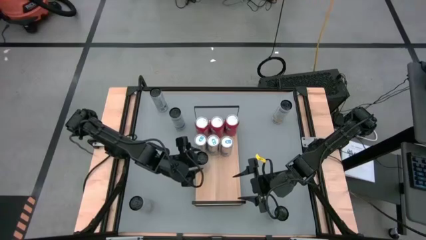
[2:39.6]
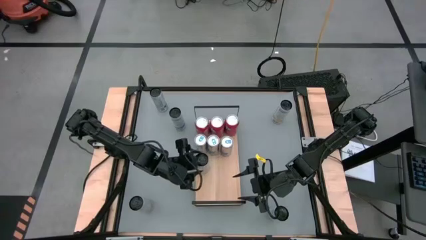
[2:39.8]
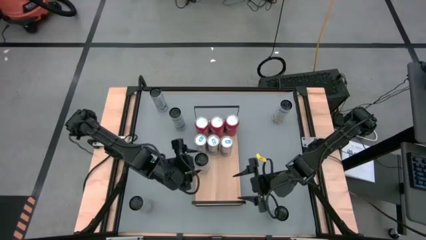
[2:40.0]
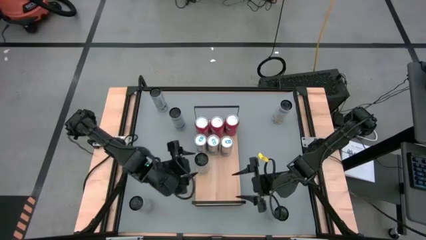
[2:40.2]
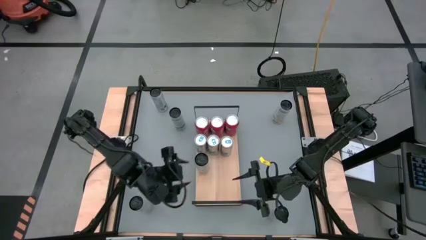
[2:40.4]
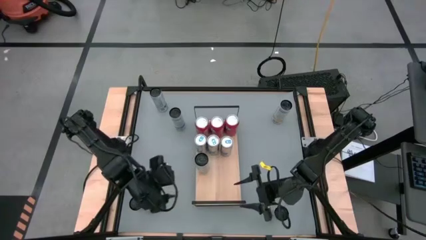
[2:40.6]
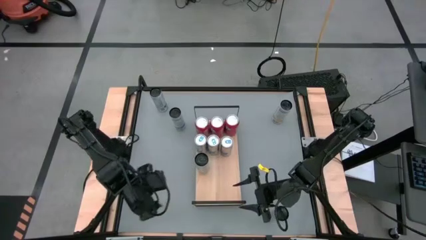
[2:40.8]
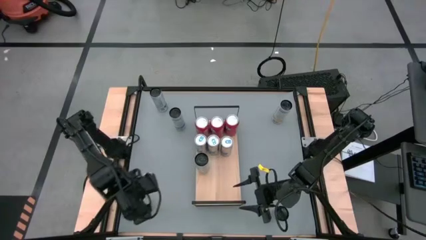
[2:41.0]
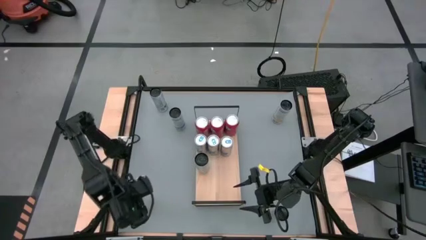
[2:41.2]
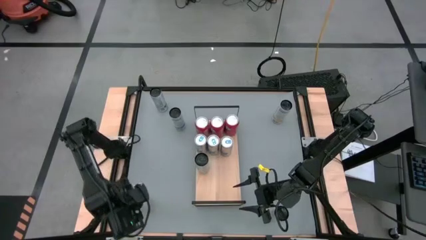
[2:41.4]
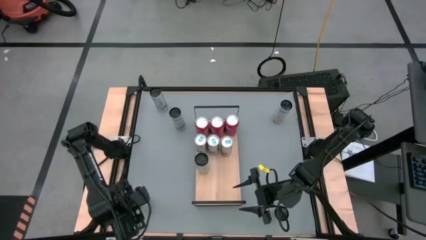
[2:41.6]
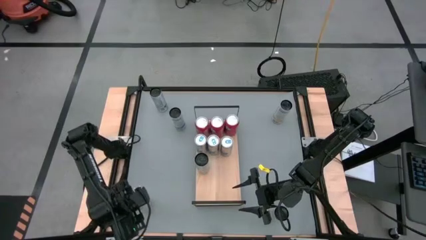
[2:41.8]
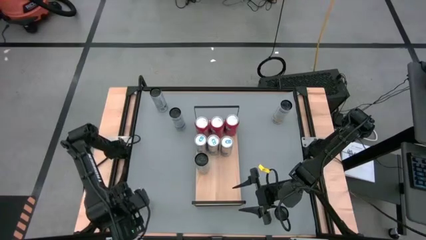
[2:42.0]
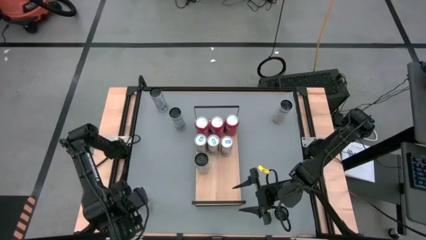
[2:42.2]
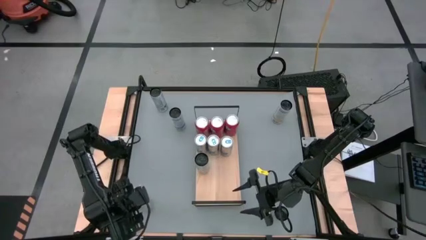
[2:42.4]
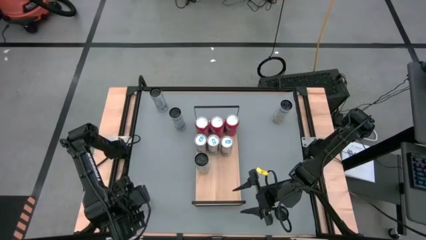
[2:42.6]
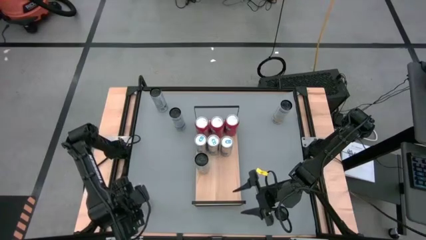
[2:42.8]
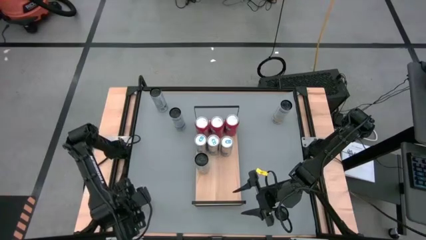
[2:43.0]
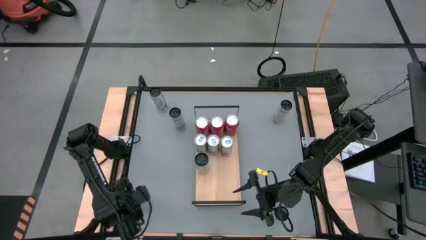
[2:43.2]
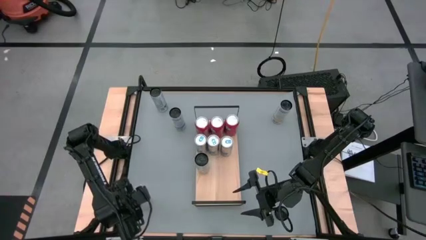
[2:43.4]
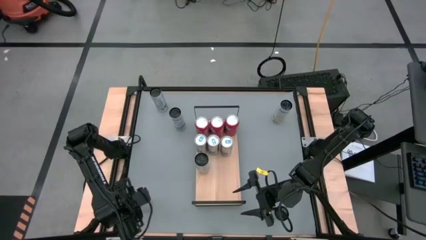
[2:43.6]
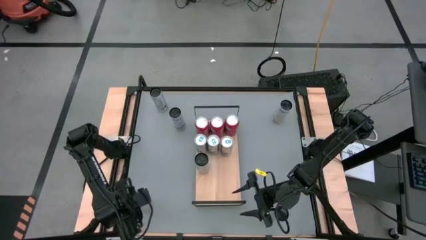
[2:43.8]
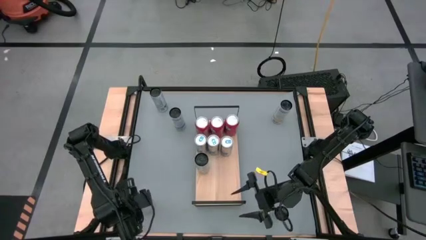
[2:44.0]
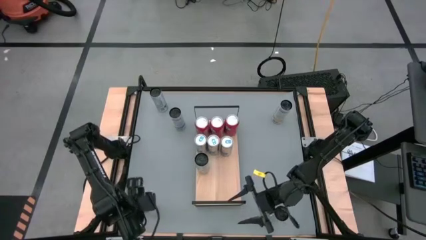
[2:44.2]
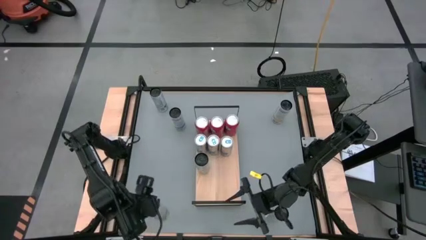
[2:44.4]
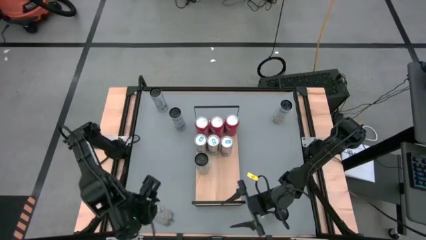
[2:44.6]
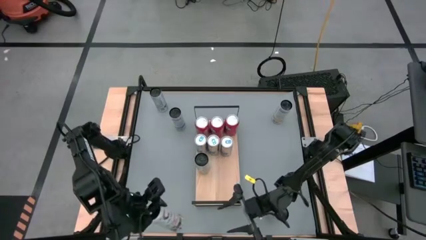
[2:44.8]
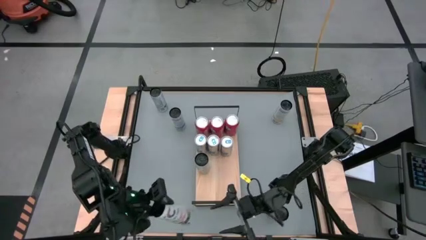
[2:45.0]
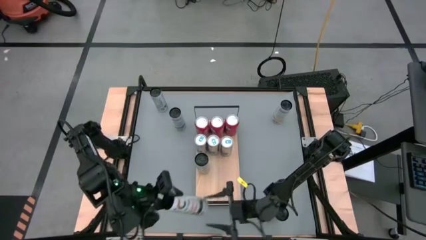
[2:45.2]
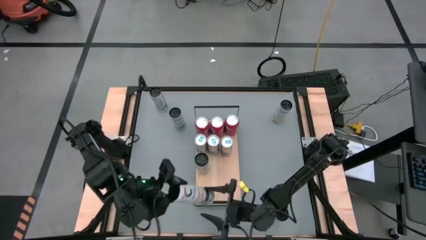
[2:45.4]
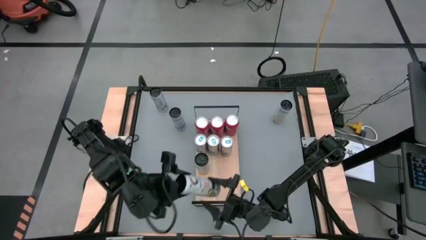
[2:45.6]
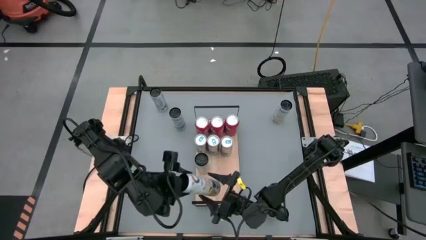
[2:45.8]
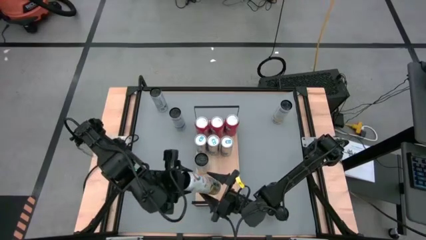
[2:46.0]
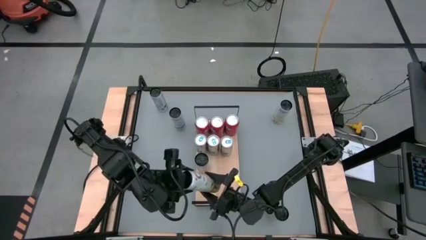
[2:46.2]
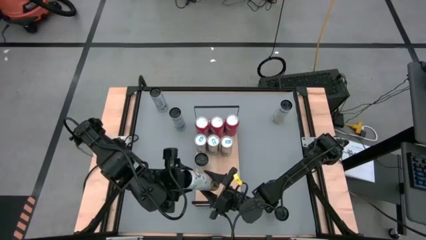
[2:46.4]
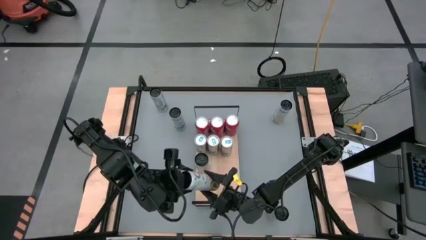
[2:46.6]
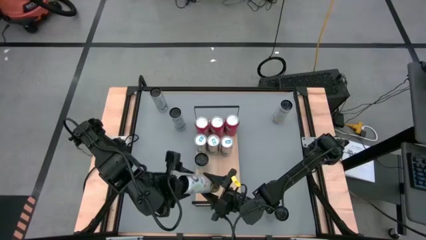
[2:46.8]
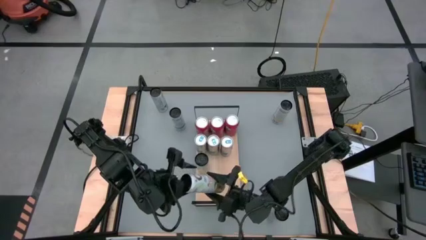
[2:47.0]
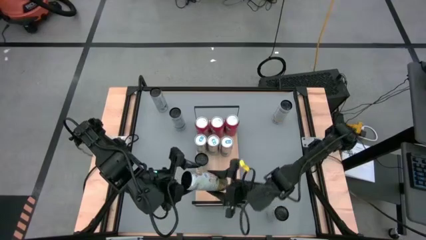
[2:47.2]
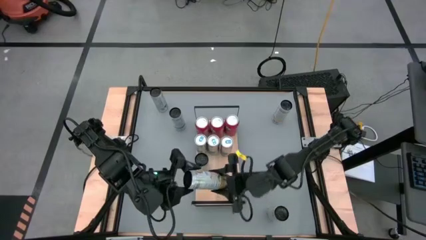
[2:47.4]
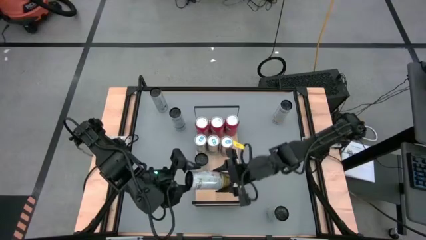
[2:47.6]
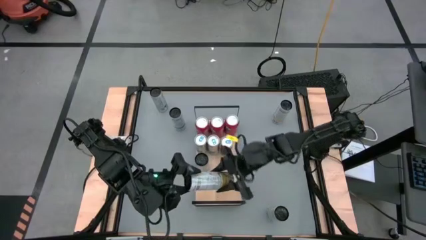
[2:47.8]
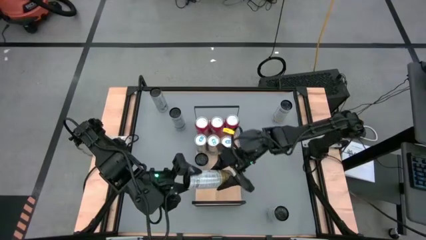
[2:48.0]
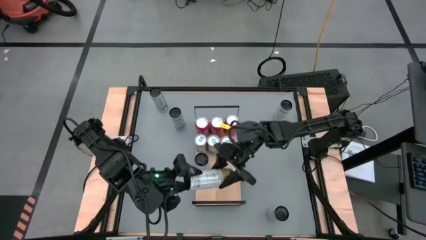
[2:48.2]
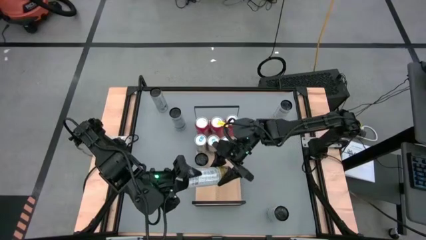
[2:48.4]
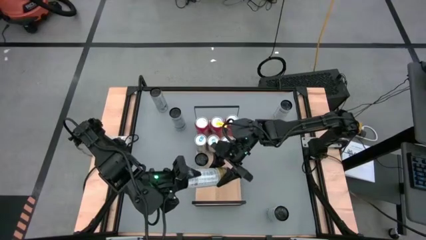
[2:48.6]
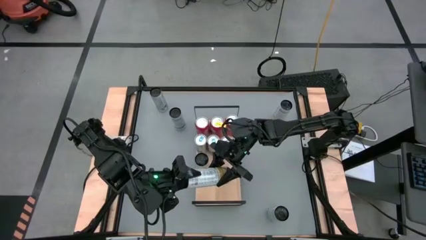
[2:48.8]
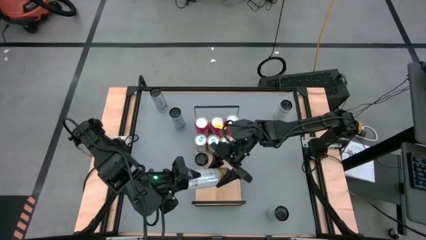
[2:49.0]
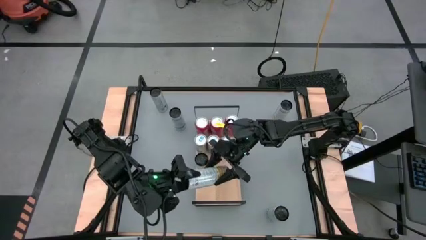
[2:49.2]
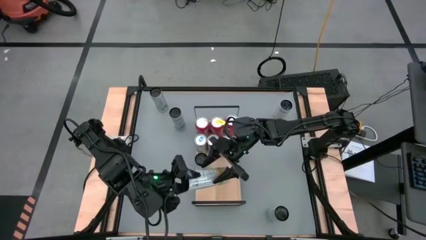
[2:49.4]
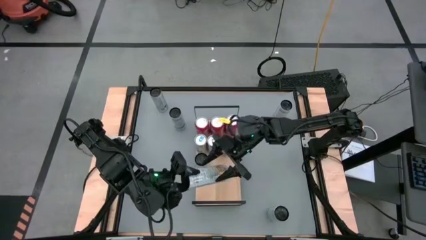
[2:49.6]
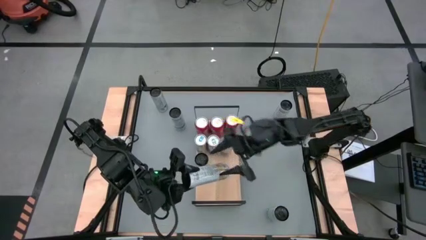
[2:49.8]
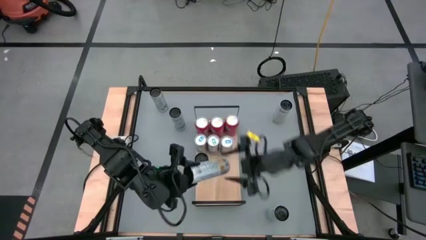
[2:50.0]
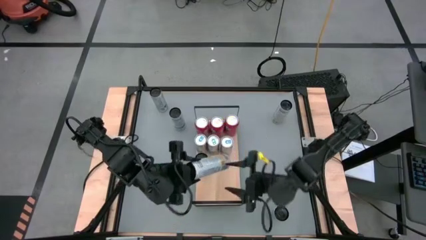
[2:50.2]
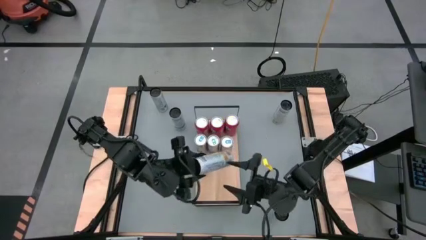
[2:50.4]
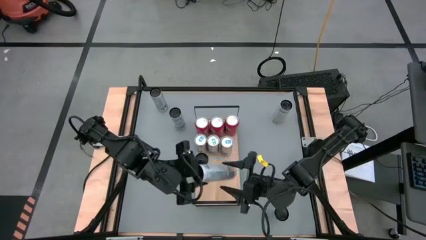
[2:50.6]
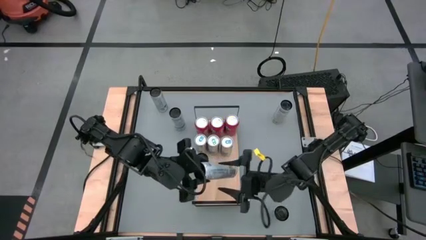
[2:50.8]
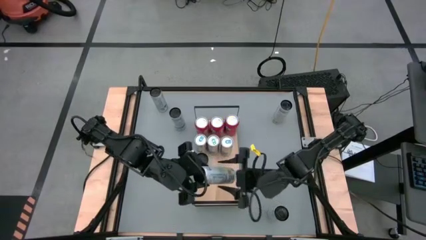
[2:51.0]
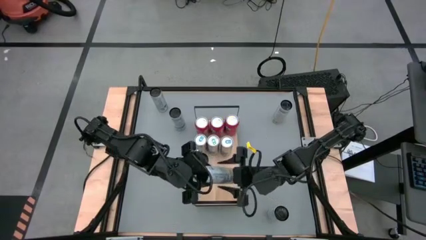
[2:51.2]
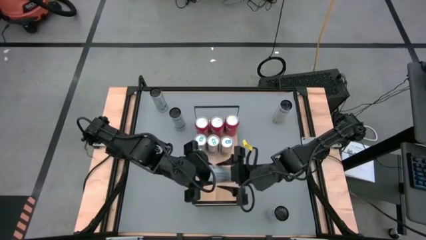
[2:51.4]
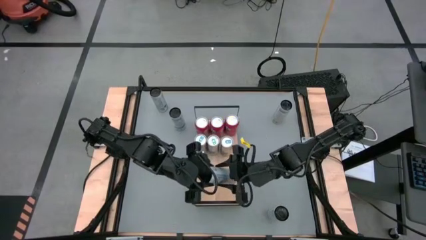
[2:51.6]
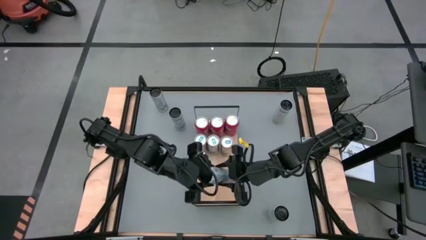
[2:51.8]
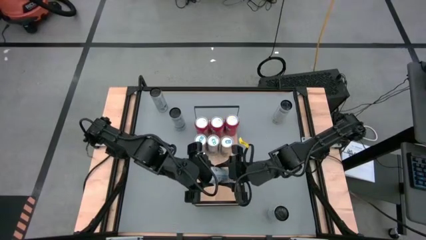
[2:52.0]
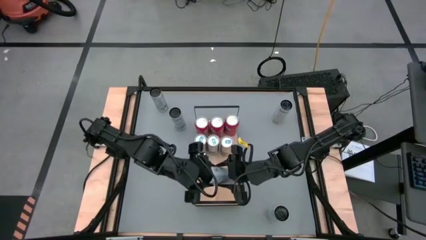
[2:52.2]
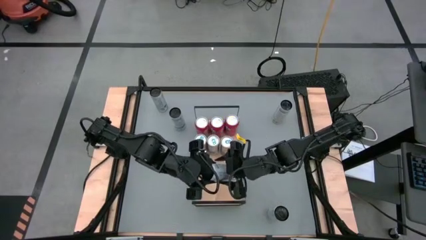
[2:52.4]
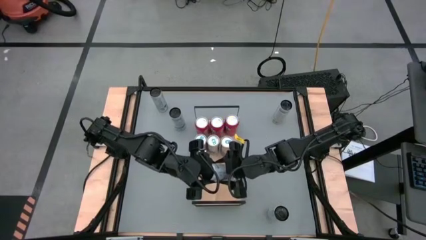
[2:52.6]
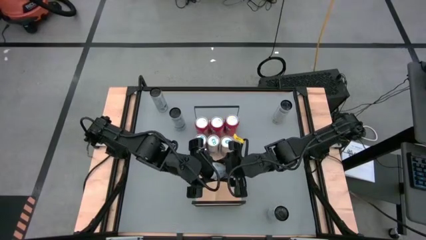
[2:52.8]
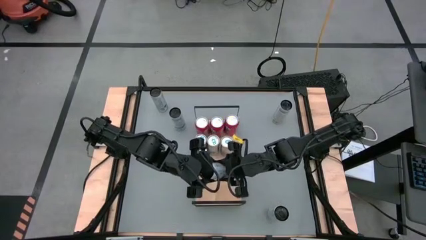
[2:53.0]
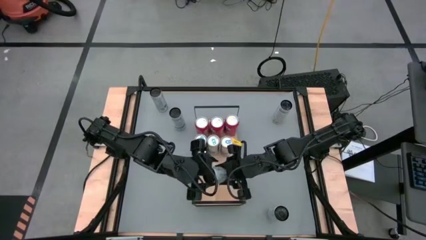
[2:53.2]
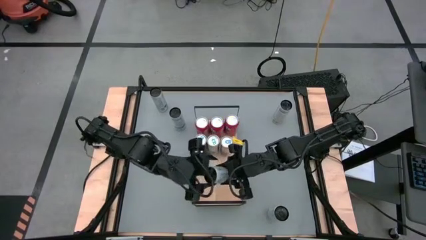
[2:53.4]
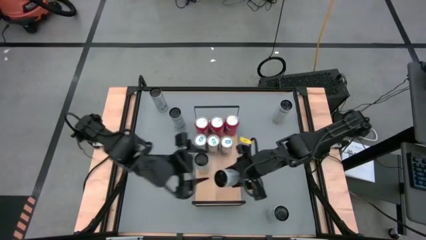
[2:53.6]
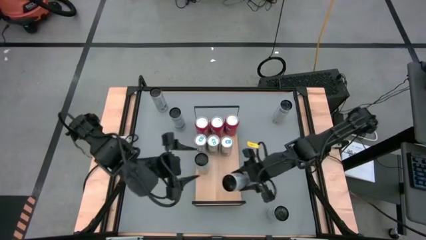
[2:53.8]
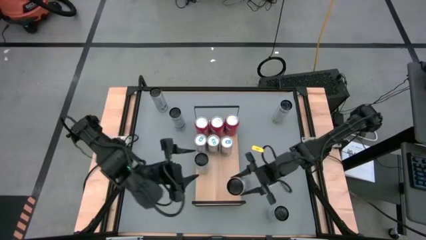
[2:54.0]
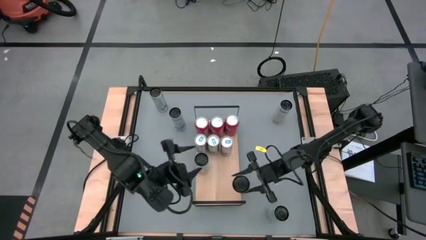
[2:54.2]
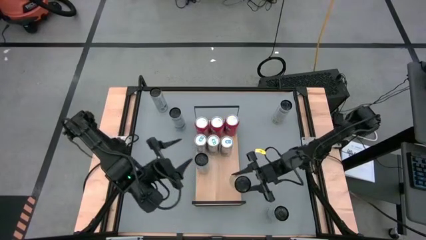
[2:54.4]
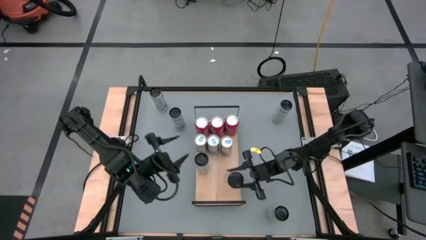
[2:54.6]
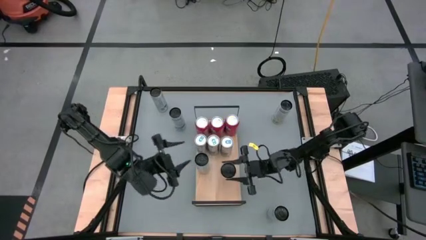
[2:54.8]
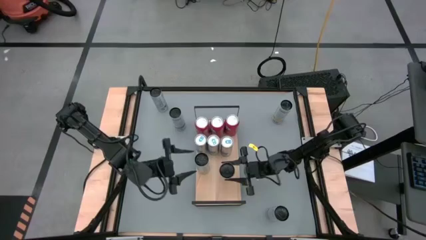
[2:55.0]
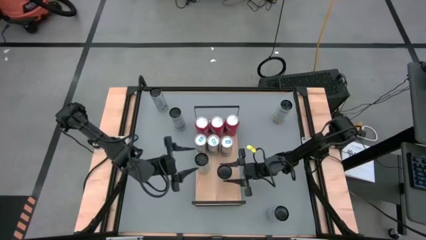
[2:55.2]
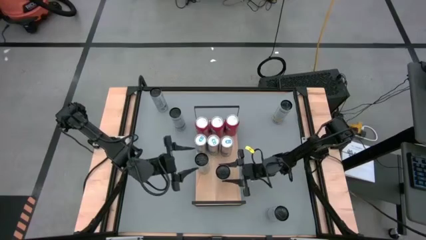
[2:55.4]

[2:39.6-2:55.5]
Task: Place canned beverage on shelf
Put the bottom white-yellow soda can aligned with the other white-yellow soda can on the shelf
